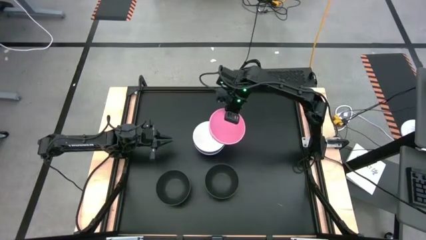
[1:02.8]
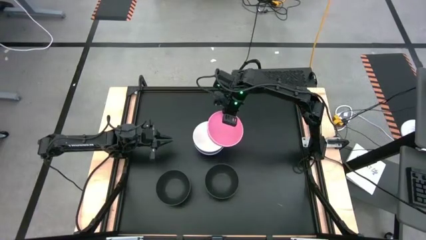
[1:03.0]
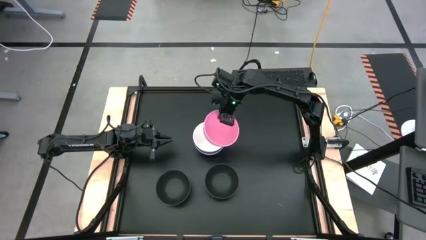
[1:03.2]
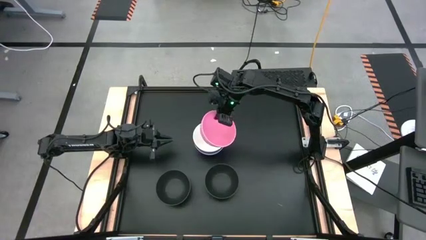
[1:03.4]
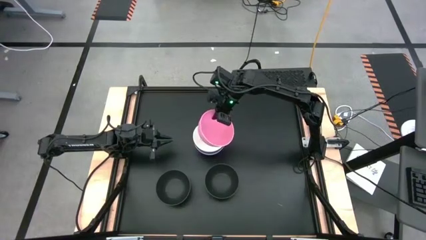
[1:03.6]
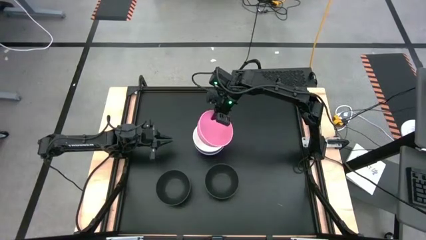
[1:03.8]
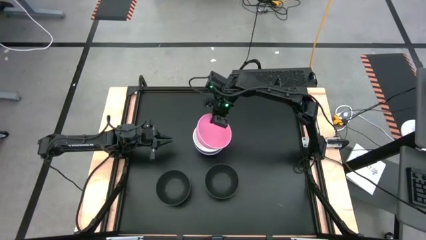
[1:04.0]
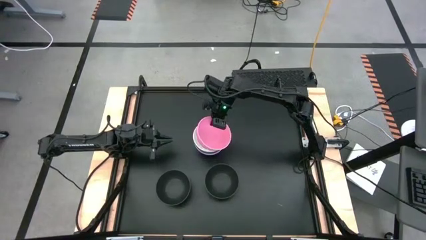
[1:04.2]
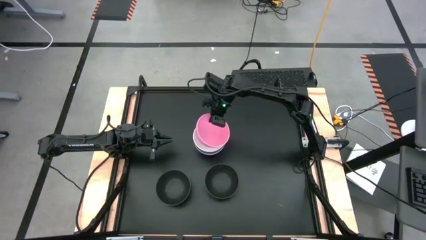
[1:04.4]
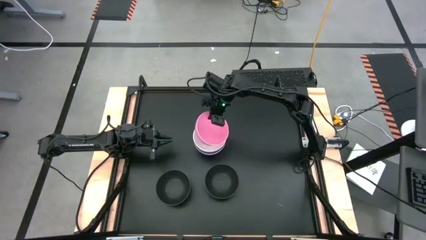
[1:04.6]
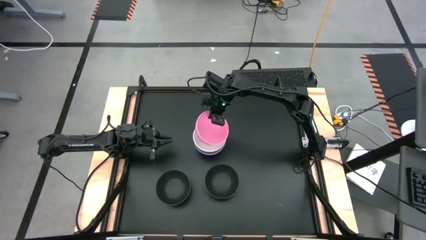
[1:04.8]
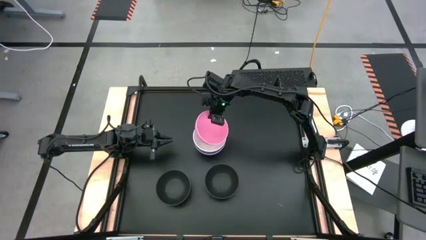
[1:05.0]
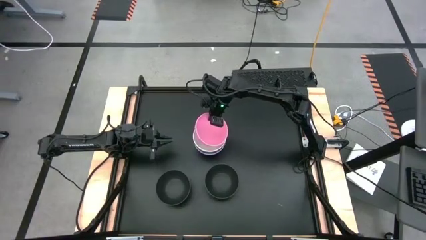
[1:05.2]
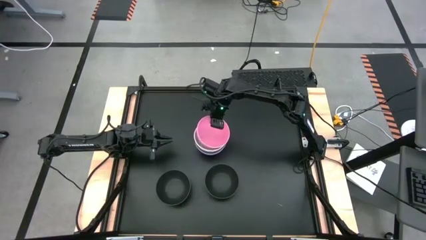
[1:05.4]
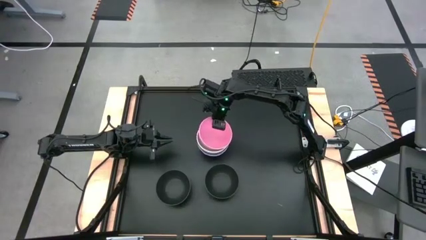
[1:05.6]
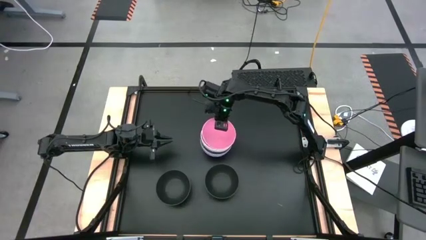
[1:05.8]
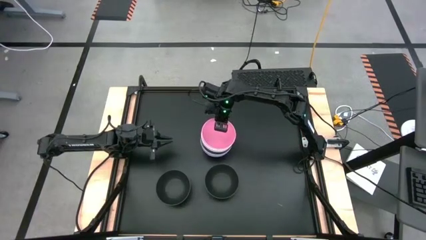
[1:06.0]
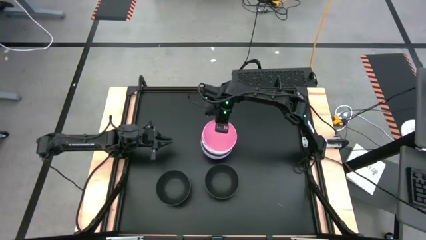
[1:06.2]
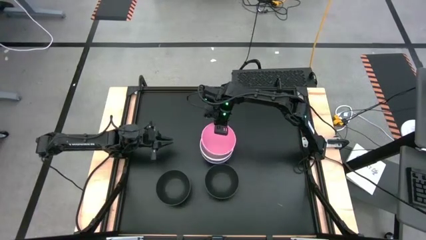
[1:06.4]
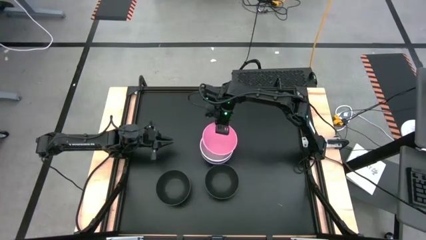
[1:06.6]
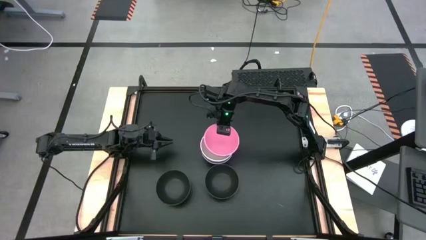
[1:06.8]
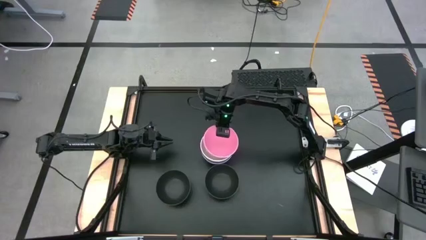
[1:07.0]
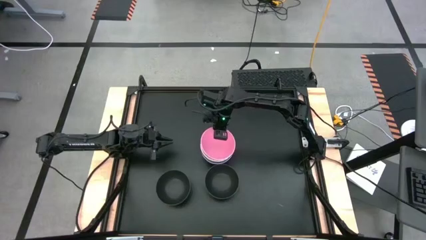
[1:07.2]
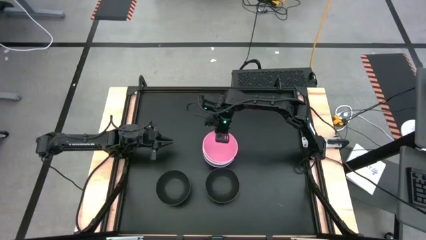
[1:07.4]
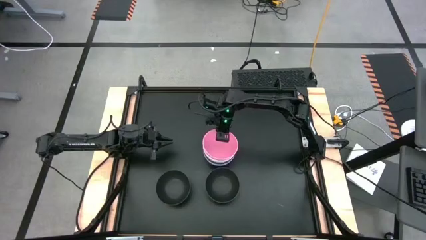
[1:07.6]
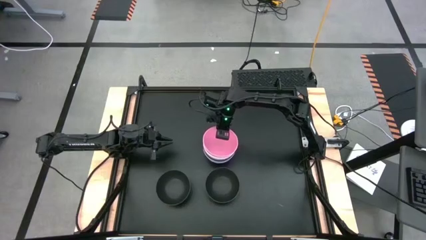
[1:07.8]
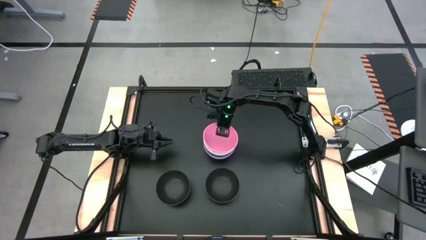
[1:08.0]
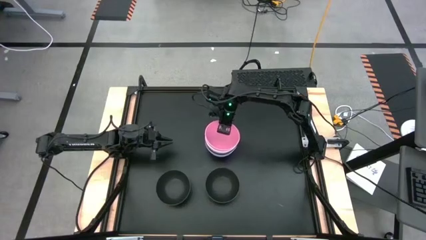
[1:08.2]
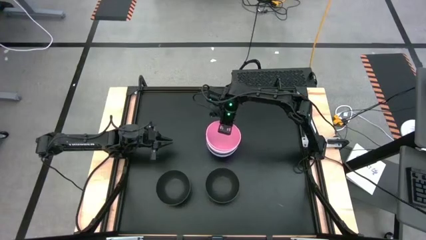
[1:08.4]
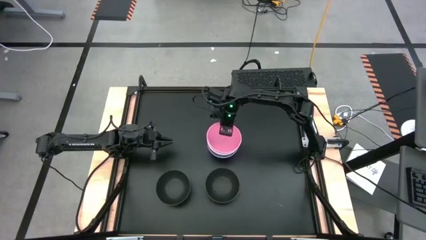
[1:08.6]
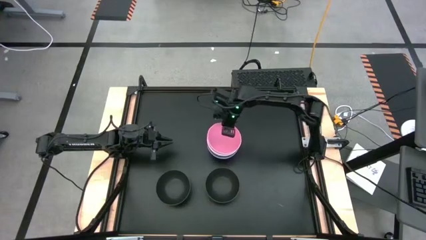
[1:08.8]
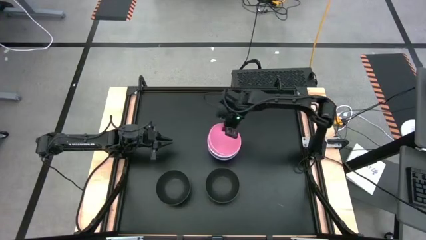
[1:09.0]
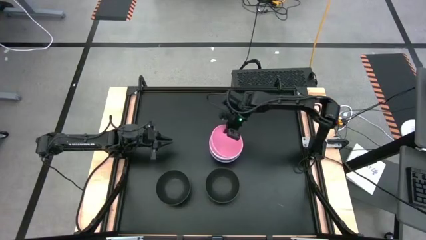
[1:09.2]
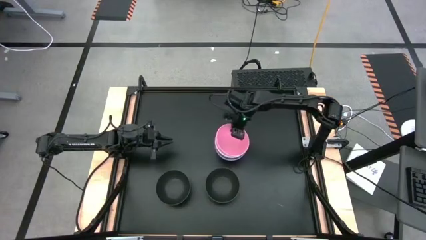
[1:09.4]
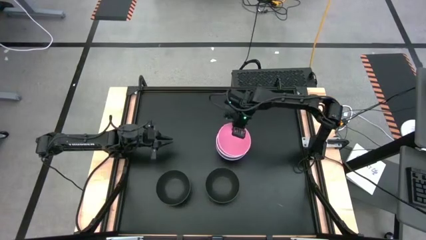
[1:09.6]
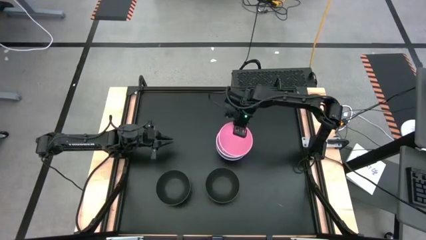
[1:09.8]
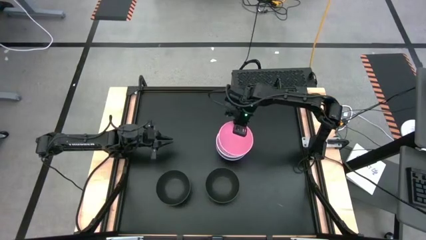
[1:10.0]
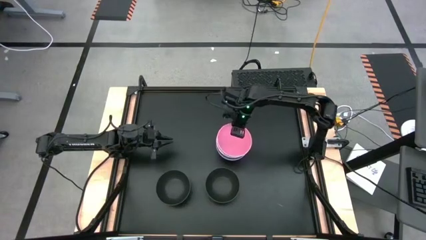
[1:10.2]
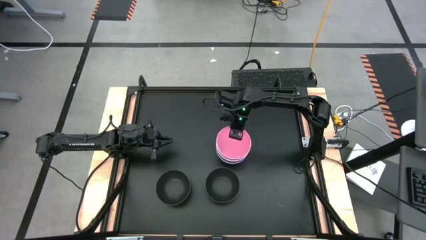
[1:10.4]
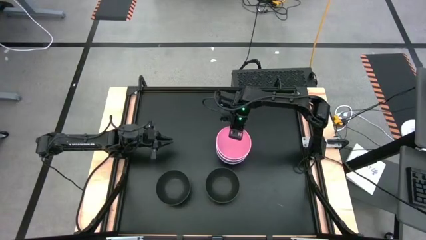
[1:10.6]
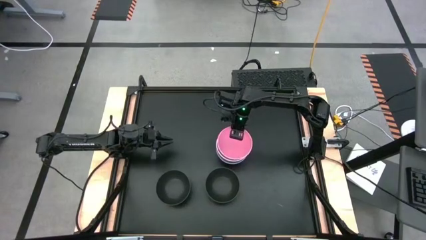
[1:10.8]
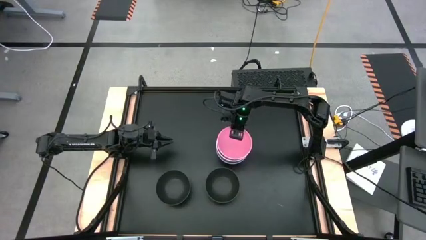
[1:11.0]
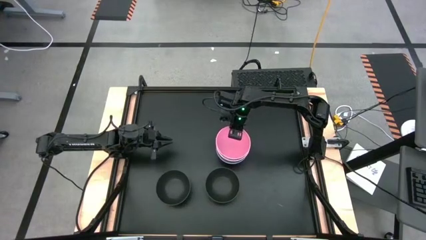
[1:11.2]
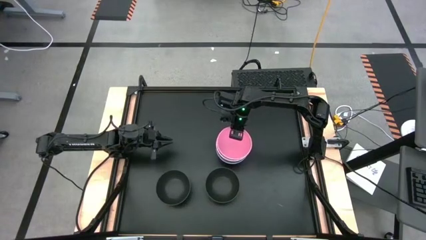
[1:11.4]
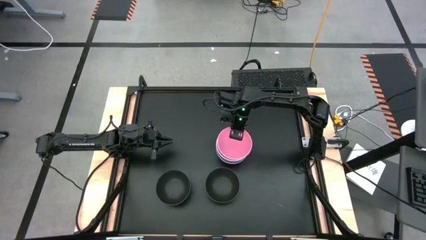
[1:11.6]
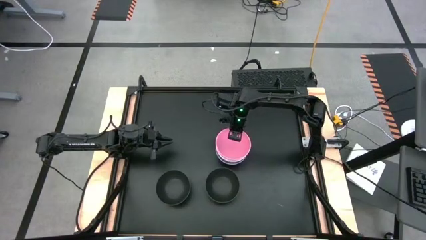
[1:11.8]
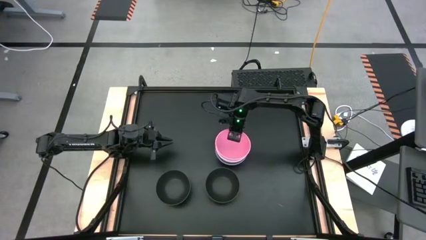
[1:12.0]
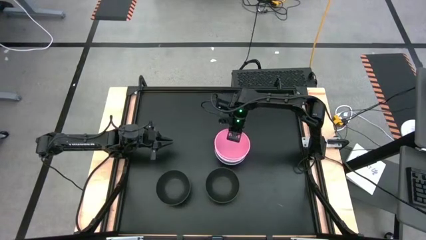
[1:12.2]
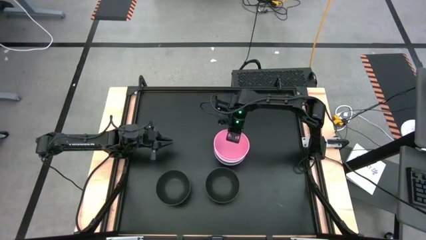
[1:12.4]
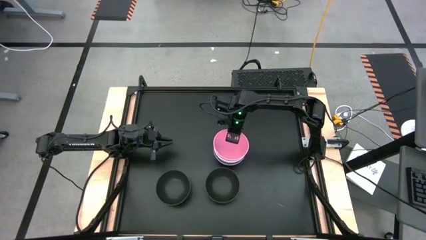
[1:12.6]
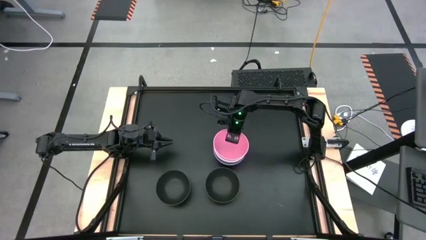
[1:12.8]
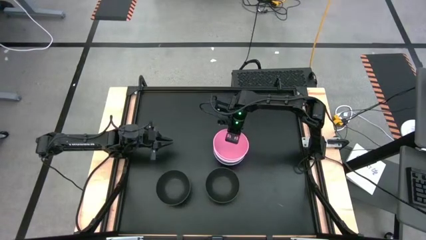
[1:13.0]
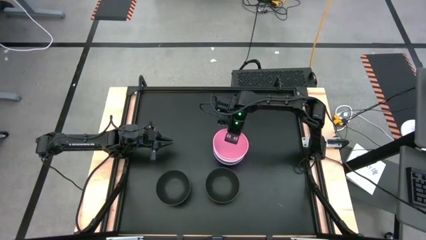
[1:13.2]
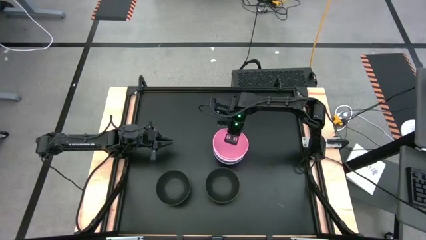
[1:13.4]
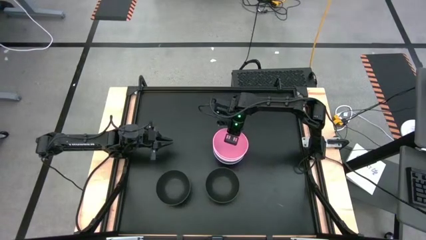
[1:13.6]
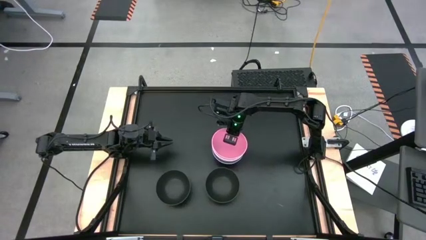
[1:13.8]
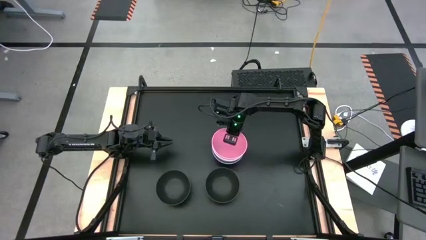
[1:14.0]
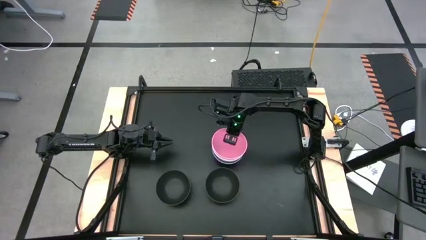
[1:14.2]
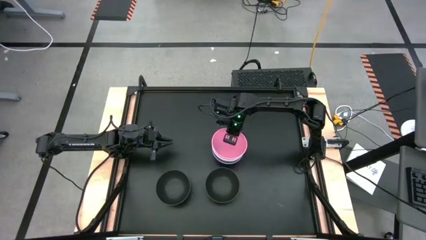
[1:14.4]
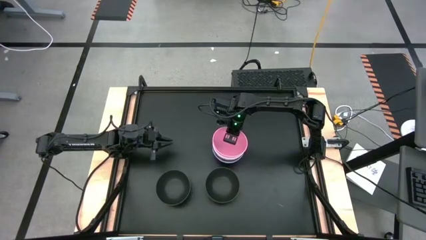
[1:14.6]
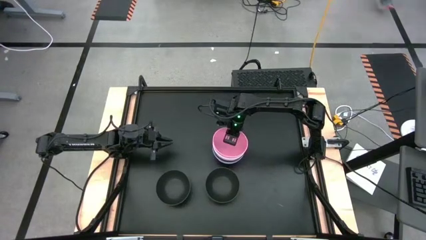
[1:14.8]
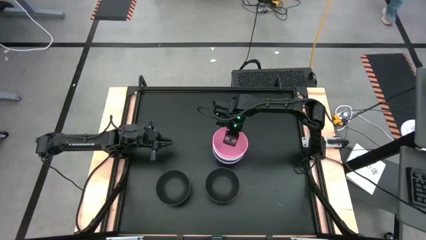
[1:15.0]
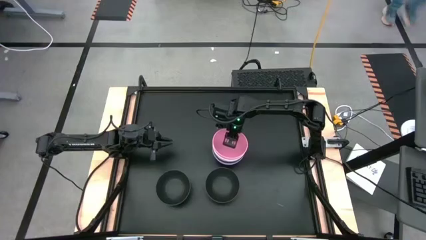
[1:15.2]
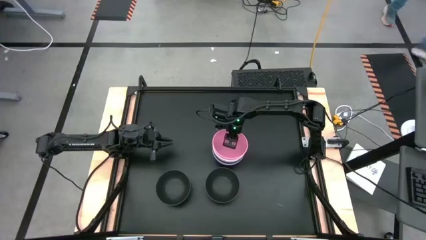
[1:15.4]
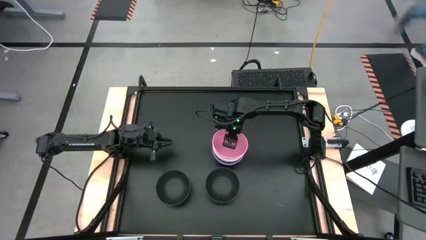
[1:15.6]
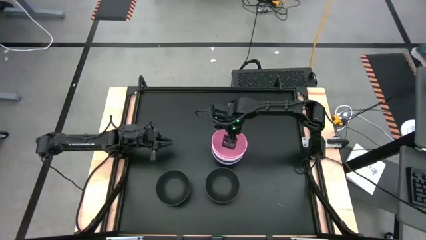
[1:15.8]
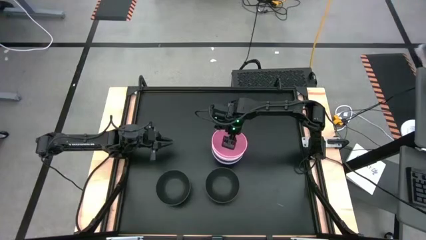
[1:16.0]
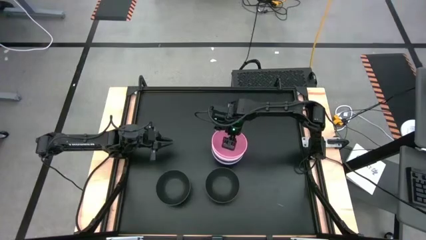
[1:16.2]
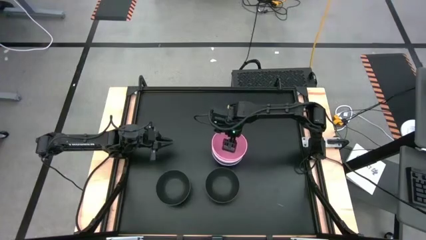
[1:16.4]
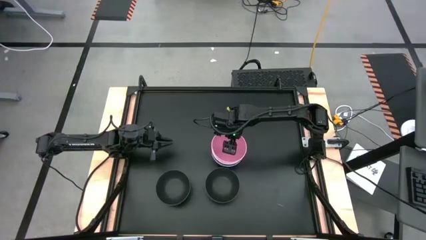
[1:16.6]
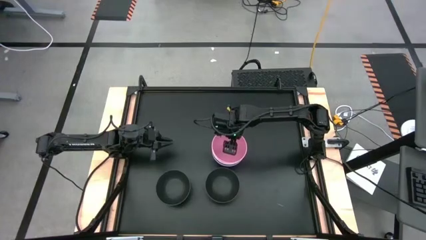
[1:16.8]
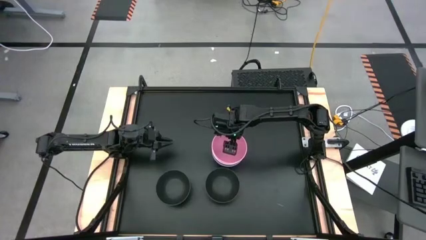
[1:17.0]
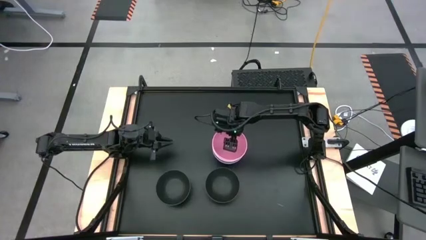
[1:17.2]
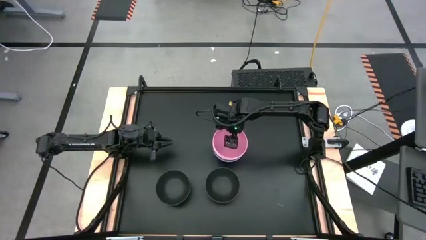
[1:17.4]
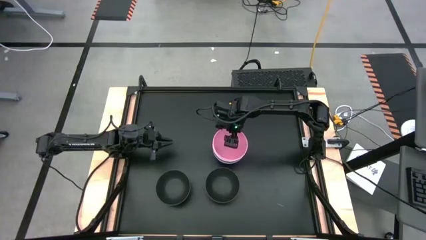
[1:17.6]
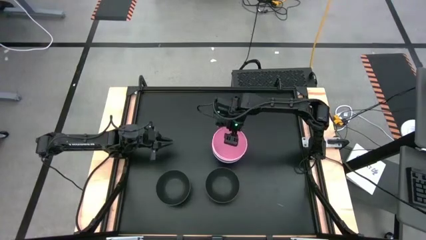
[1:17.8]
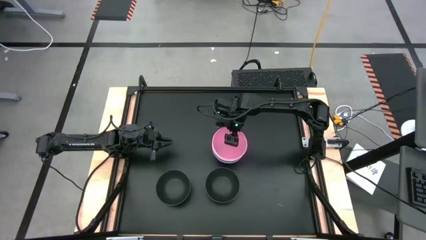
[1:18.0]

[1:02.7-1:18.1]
Task: Nest bowls inside each other
Stack the pink bowl on top of the white bowl
